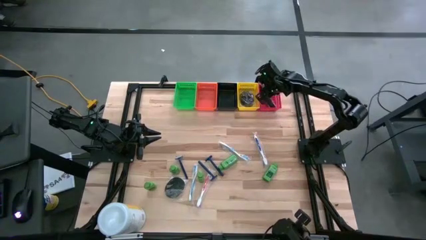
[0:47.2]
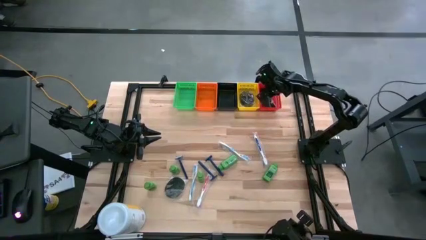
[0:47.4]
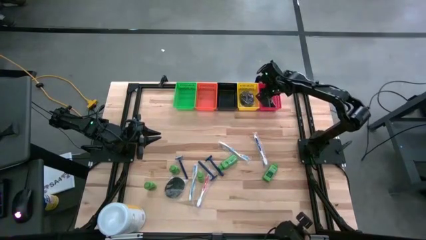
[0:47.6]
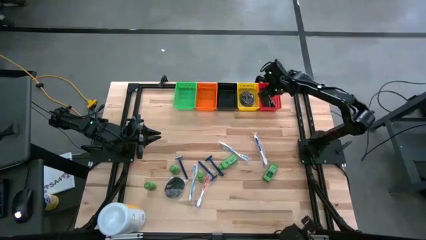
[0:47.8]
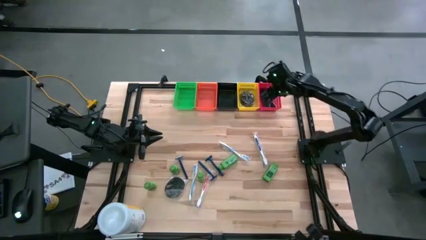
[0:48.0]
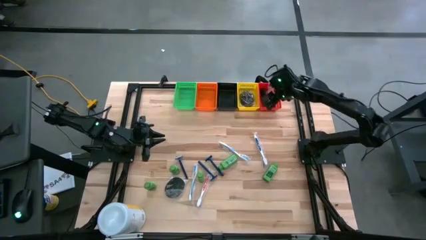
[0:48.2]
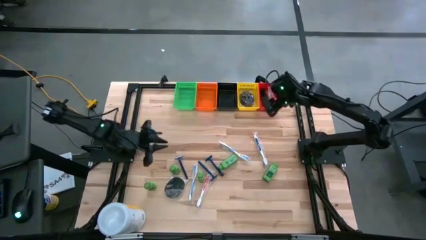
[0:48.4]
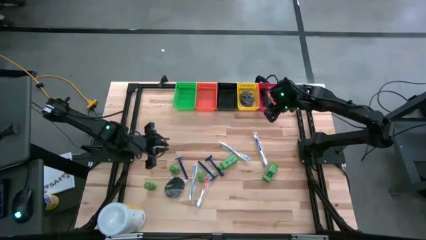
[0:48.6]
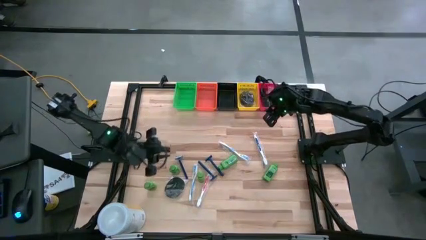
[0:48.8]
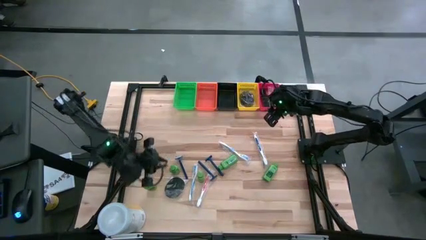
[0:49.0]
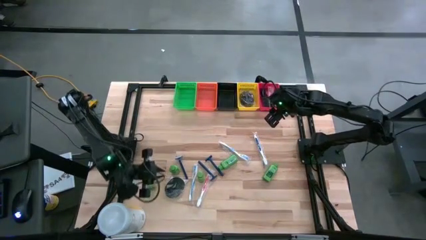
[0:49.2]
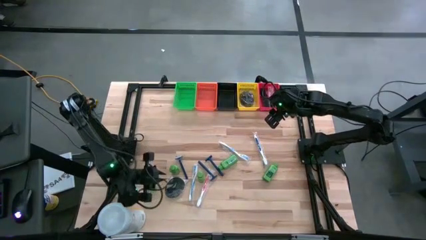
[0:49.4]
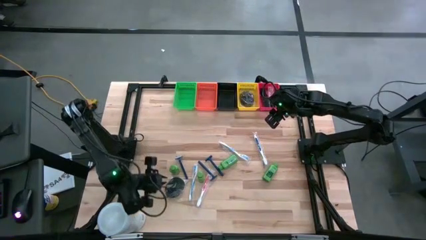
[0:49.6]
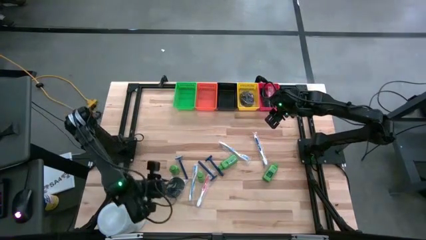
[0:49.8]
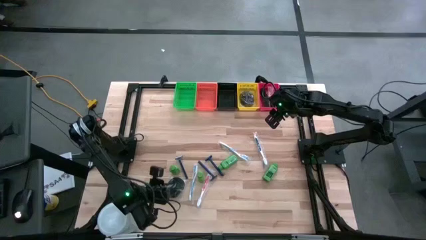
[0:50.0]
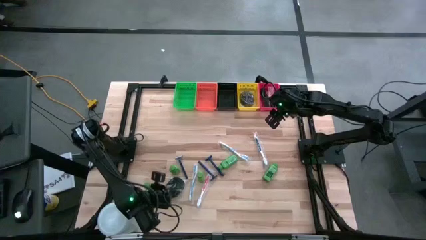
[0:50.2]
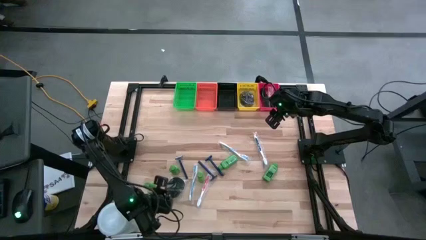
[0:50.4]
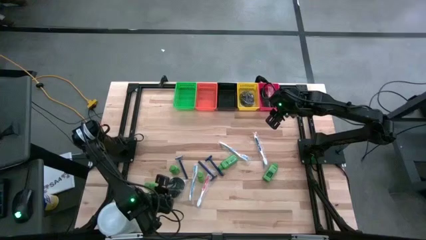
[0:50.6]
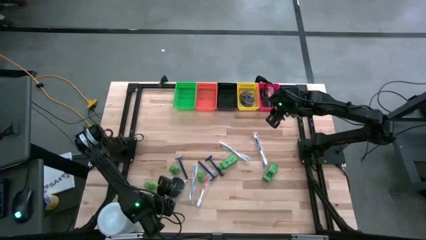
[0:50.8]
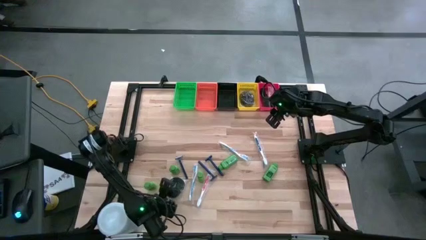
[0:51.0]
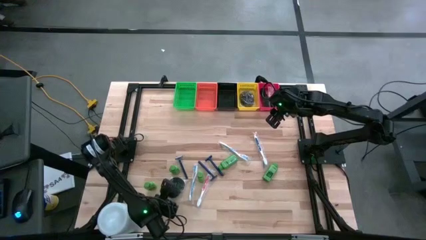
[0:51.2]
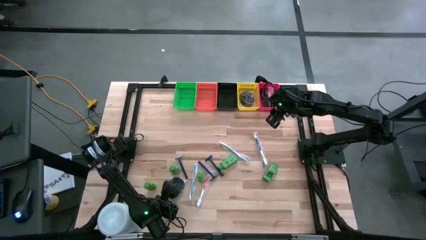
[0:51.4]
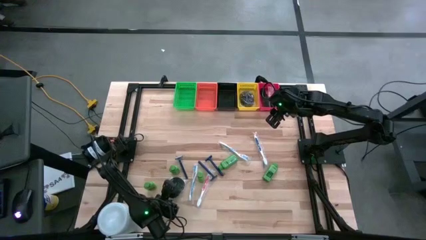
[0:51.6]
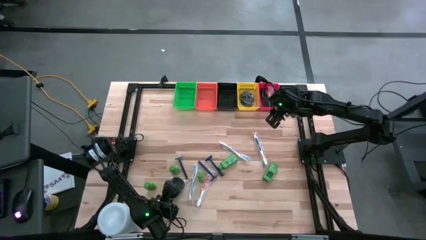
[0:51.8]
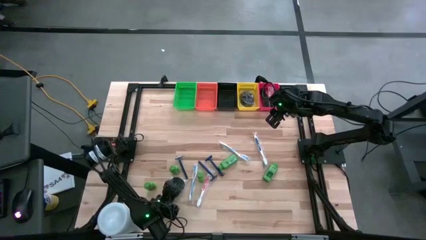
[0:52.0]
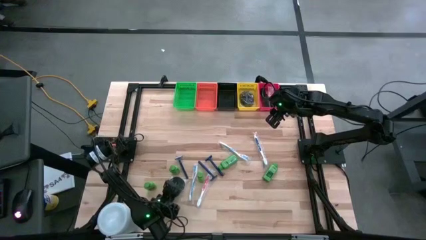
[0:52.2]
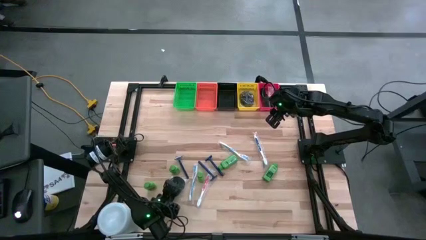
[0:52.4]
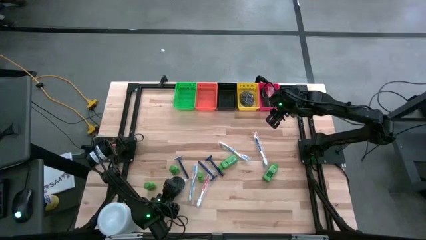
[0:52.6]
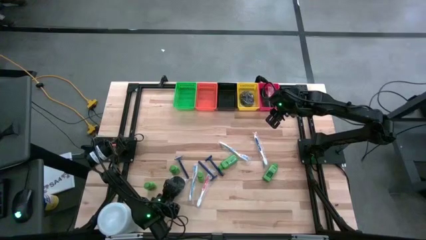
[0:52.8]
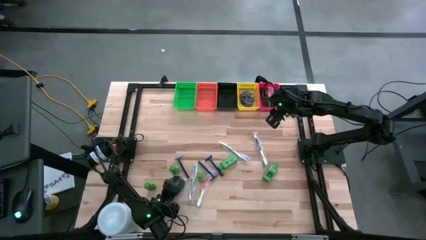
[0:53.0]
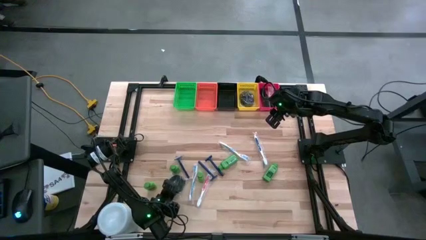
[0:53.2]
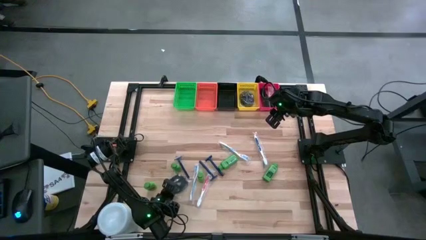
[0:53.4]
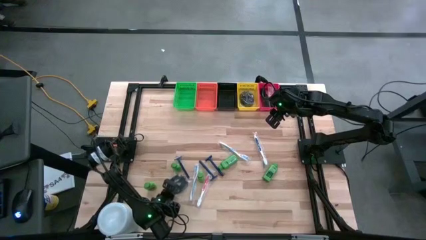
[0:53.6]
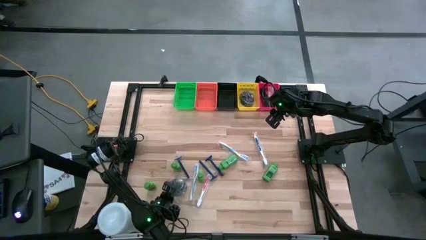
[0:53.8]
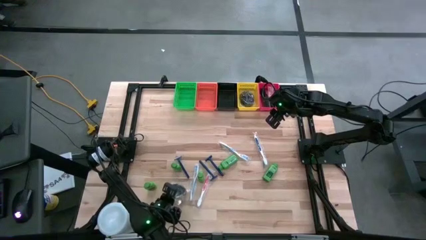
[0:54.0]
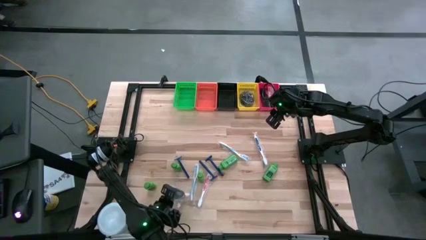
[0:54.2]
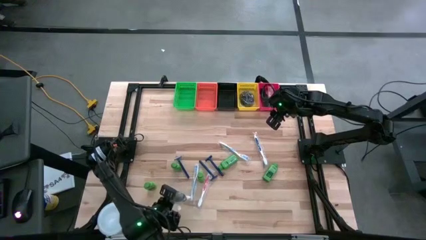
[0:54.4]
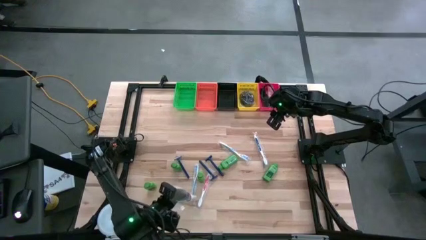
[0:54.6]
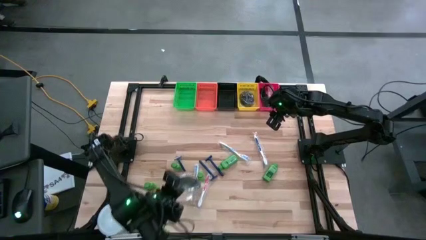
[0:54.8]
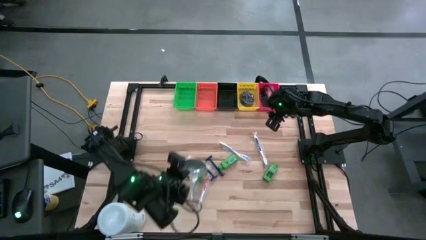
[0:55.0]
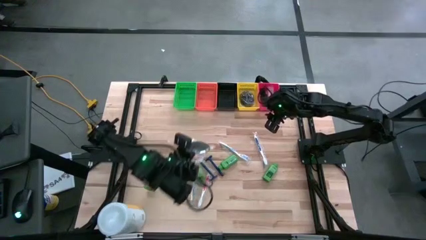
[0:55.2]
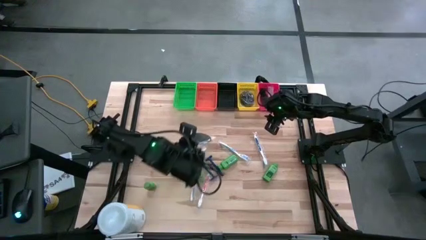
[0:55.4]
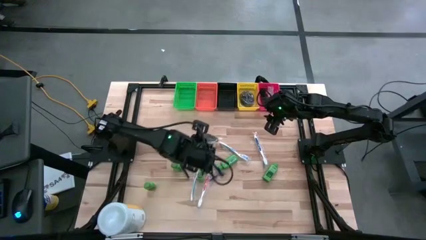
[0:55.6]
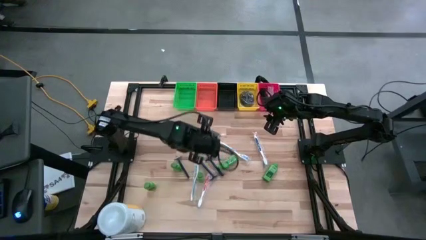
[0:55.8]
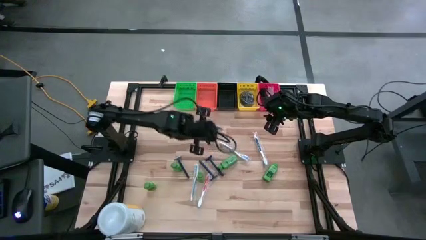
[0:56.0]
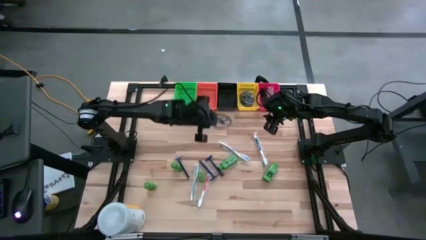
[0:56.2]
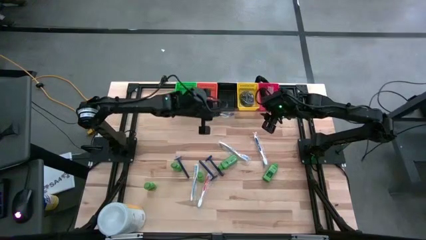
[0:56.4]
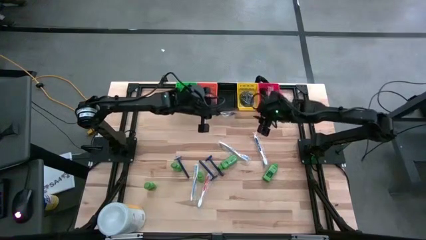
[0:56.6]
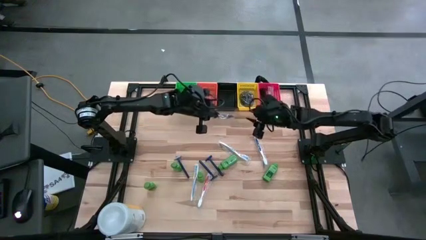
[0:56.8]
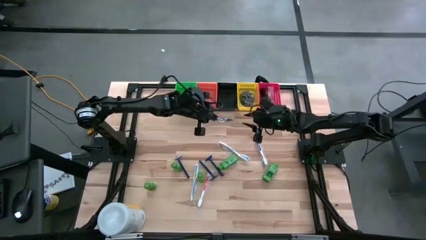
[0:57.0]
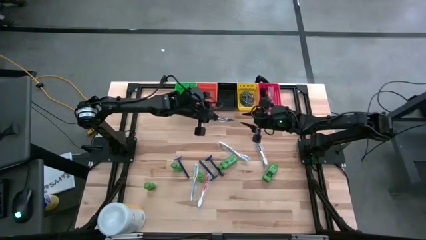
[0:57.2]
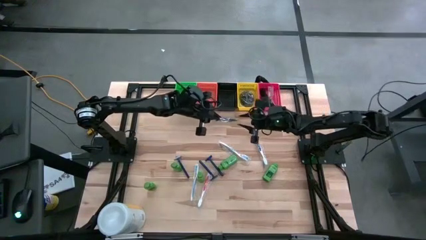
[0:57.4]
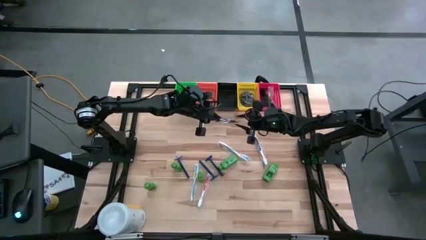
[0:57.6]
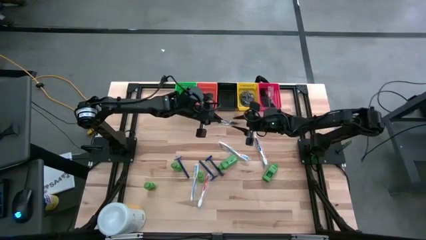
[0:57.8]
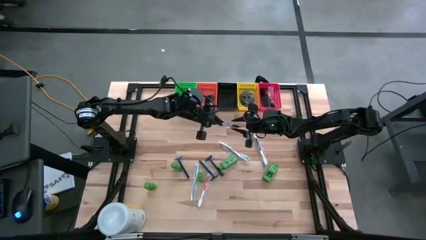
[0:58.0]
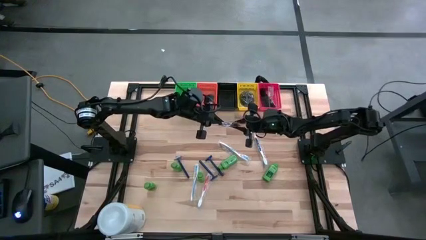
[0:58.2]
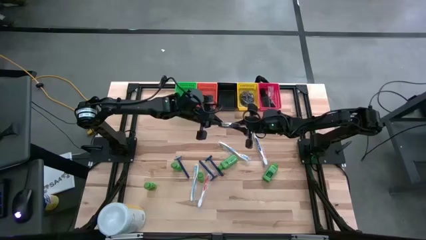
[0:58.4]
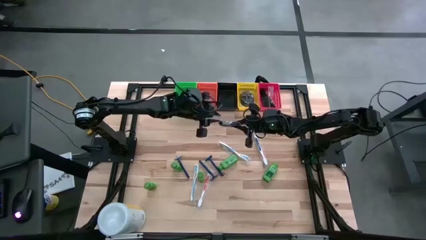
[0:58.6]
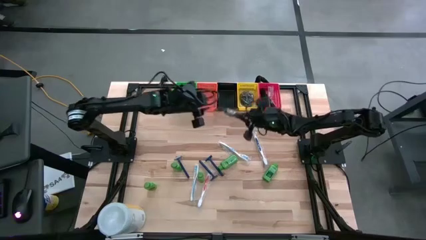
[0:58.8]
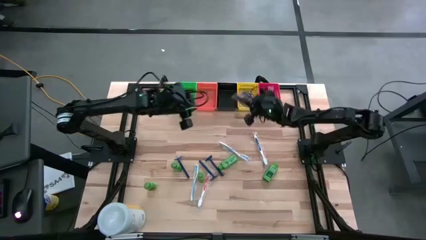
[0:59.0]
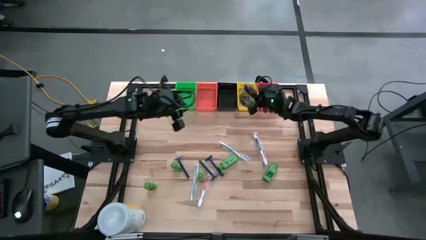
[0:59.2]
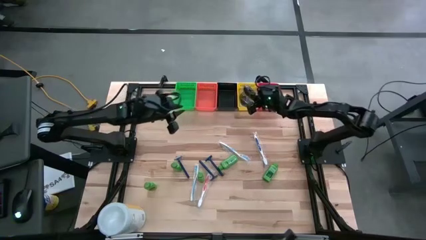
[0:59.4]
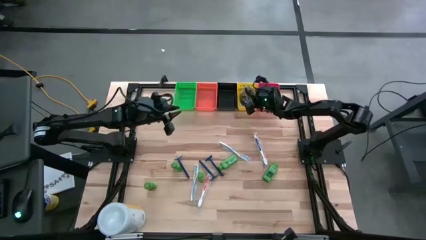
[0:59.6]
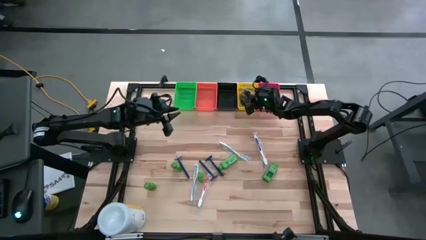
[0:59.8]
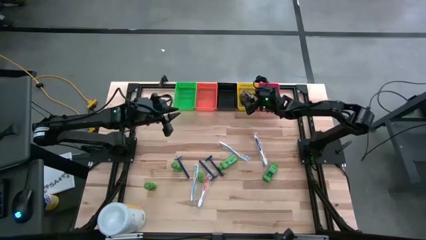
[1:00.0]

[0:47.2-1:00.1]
Task: Pick & Place Travel size toiletries
Put the black hairbrush into the yellow bin
